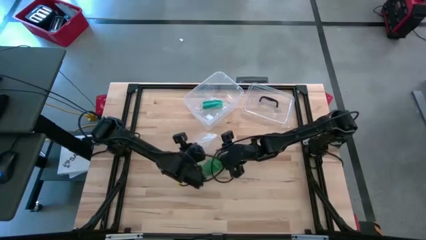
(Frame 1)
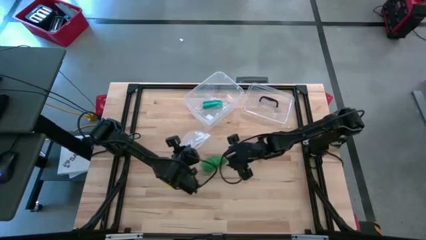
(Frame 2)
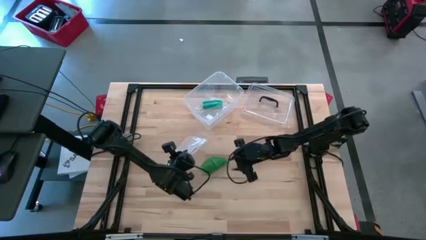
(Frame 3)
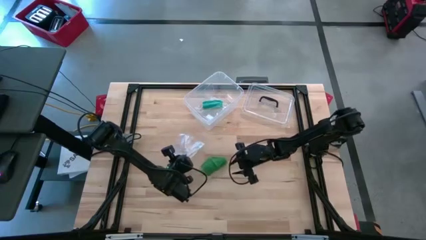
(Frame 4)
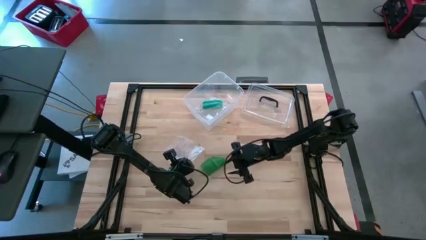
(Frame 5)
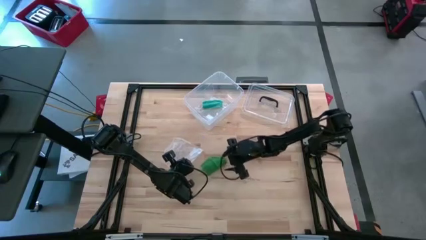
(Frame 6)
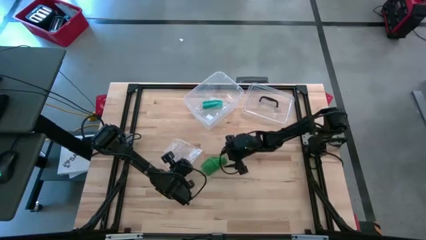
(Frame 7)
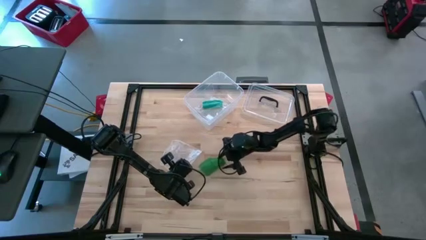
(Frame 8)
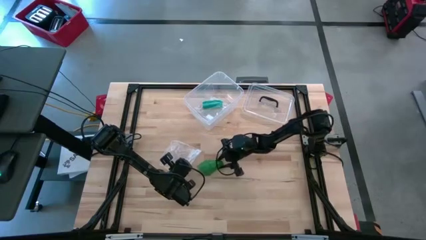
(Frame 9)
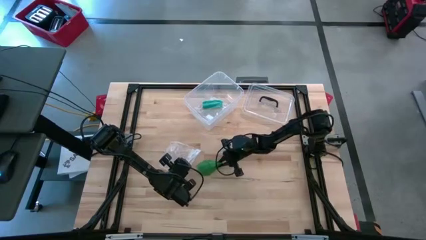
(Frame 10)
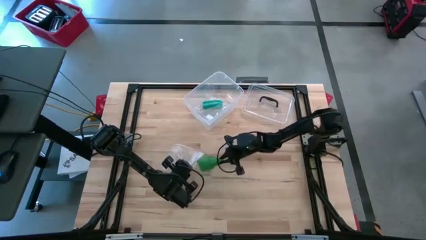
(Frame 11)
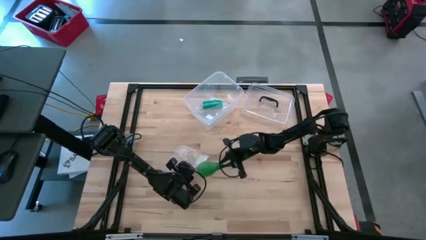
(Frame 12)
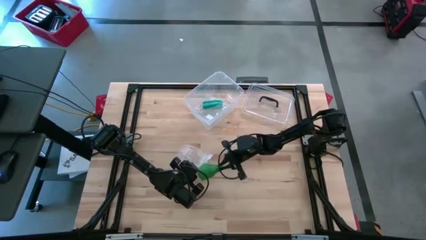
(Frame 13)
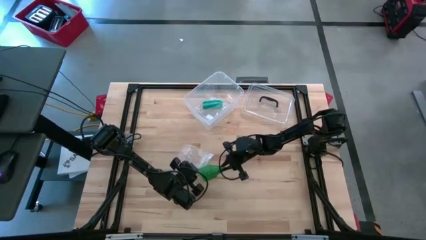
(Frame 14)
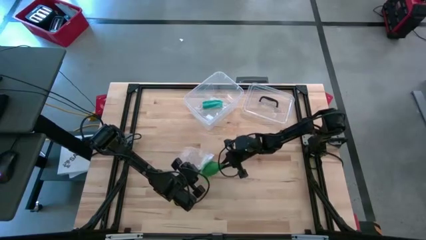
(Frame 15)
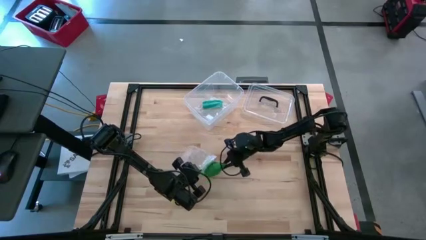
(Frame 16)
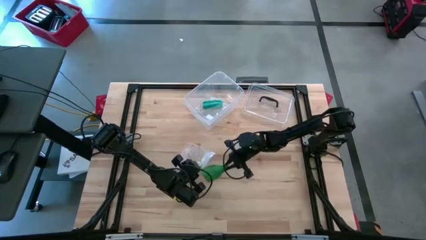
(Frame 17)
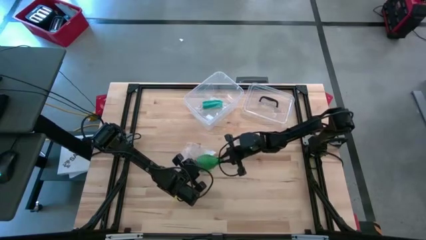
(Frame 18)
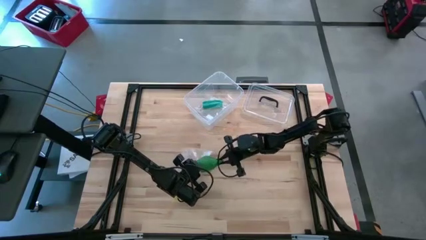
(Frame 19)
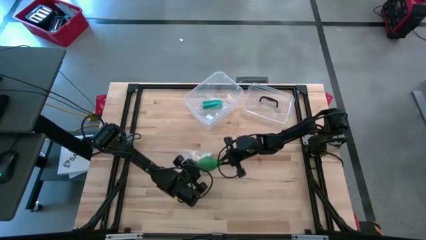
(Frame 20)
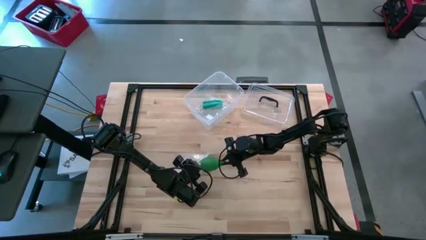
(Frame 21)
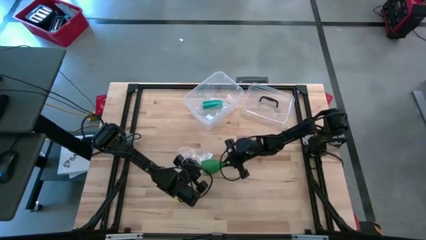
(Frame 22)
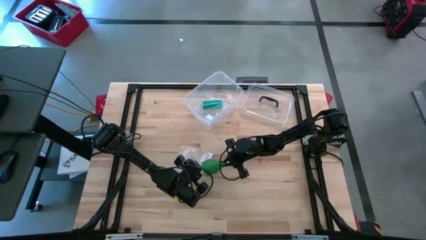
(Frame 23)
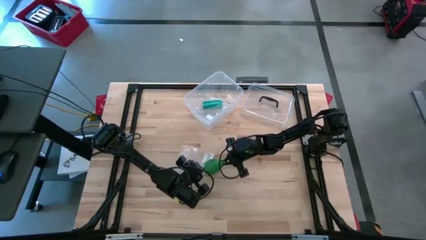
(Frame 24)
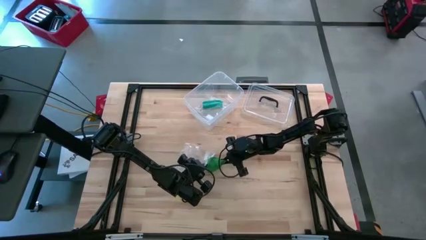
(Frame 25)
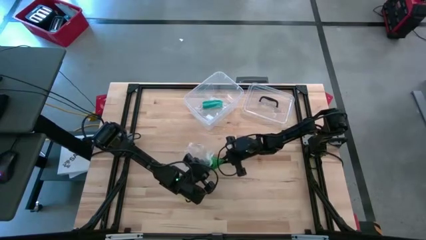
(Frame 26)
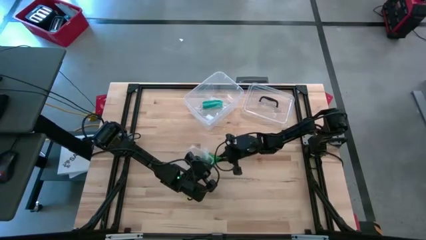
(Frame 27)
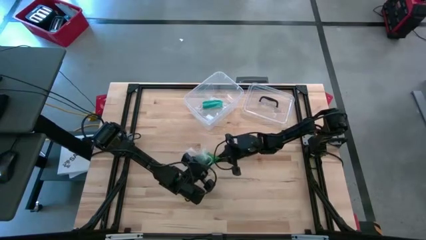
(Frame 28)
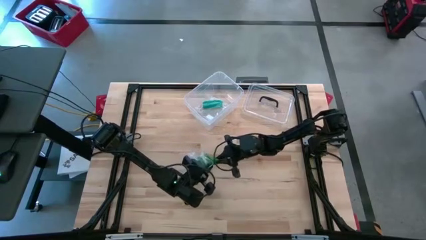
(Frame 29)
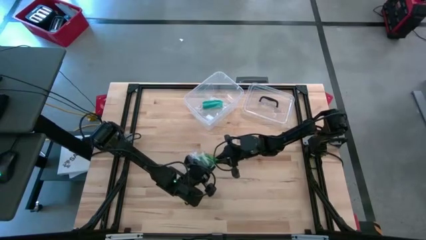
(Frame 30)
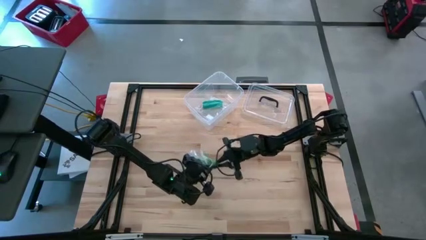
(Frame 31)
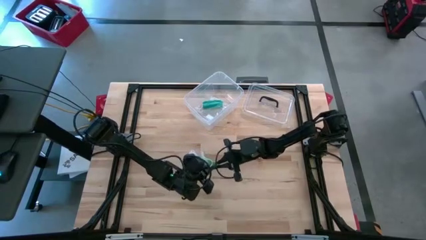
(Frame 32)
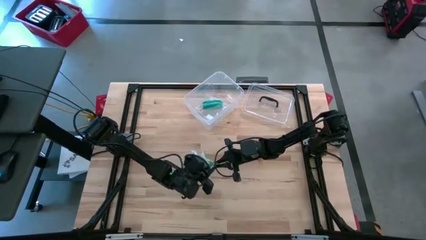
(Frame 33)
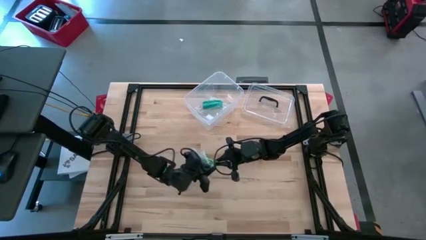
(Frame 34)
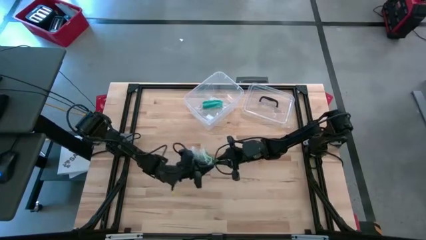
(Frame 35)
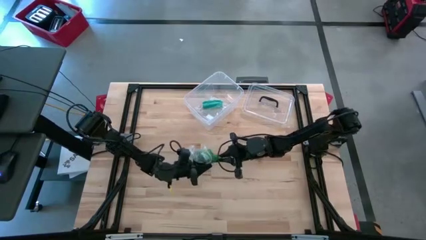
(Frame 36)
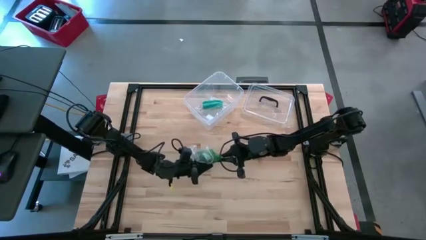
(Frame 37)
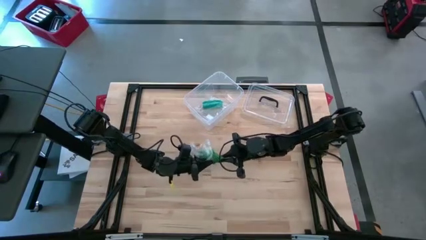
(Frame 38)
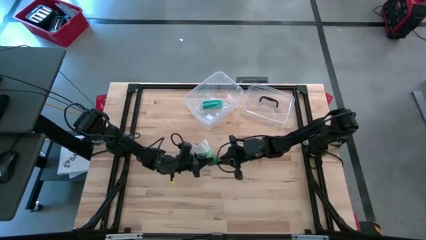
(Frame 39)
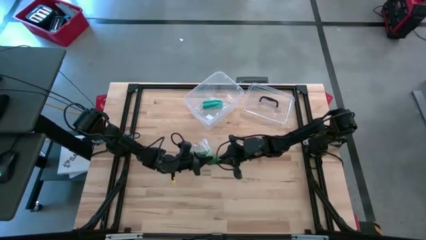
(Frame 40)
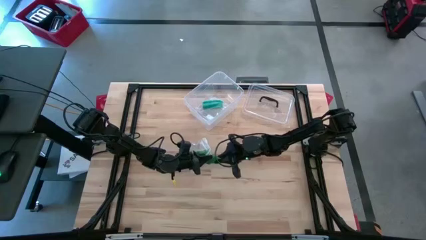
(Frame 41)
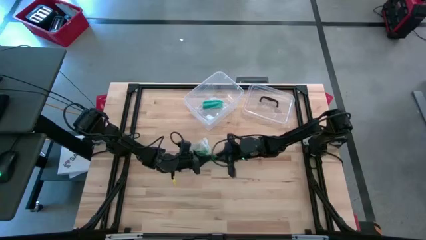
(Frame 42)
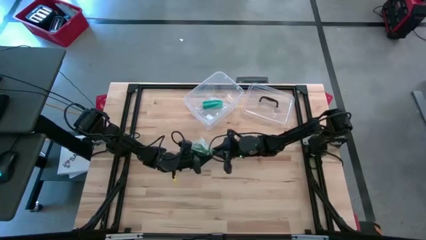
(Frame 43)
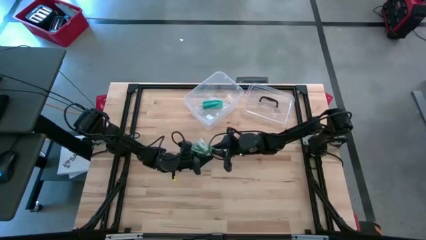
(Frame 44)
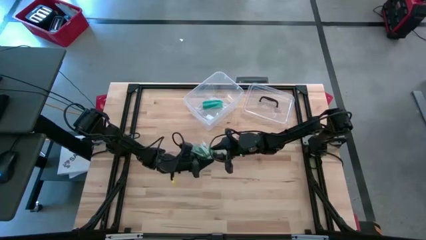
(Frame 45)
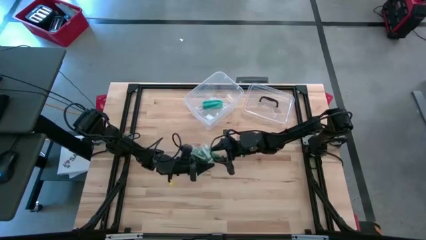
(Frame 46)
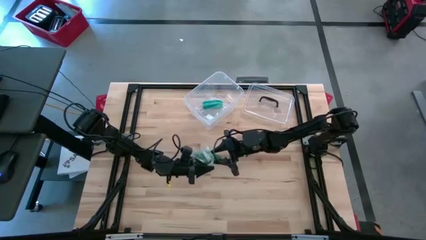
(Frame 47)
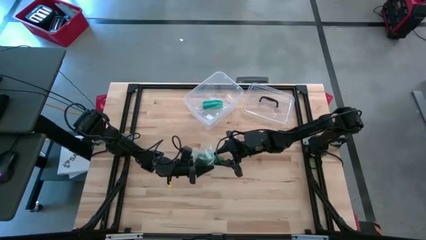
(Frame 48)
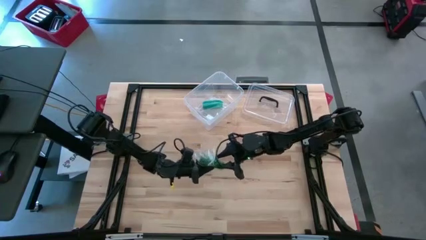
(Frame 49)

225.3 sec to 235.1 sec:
Task: Roll bandage
Put the green bandage into the transparent zip bag

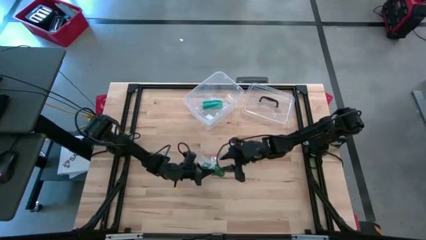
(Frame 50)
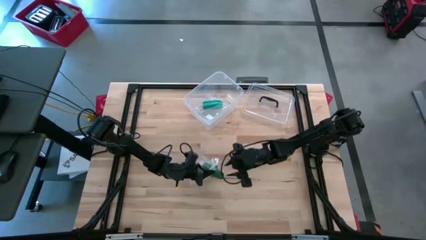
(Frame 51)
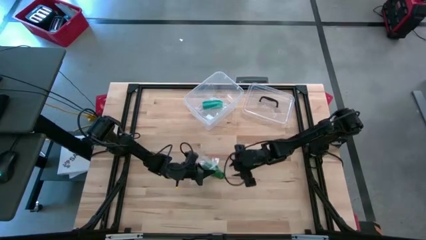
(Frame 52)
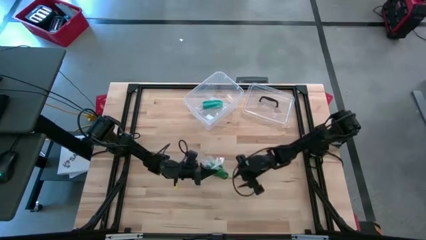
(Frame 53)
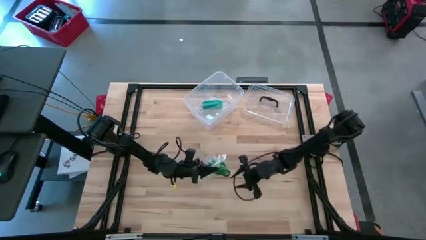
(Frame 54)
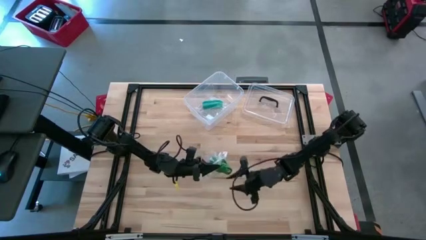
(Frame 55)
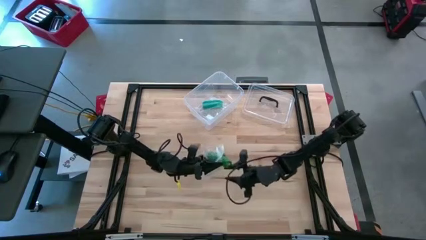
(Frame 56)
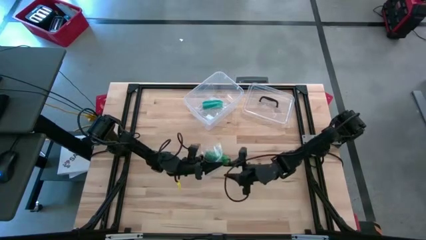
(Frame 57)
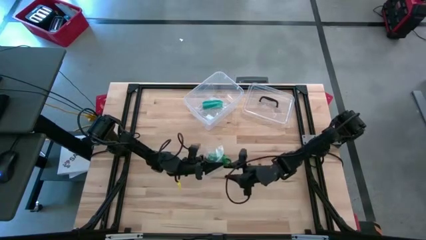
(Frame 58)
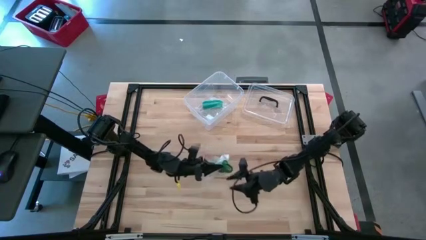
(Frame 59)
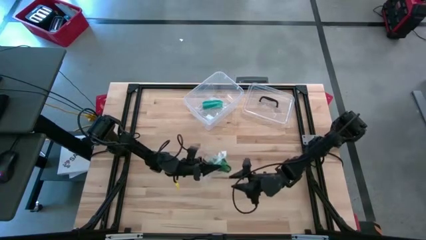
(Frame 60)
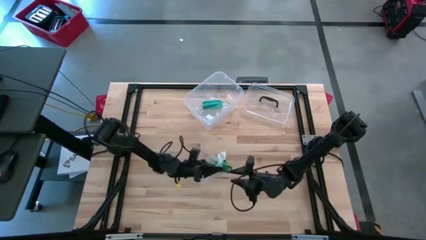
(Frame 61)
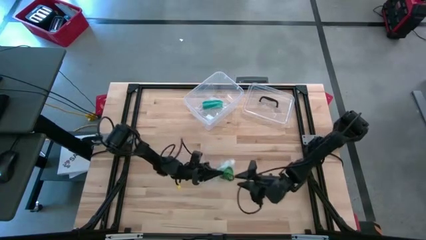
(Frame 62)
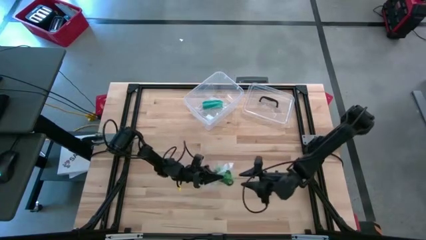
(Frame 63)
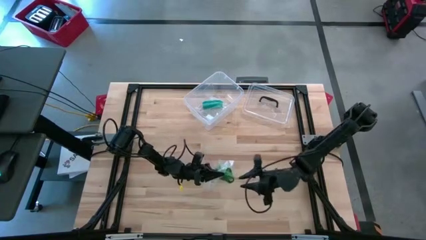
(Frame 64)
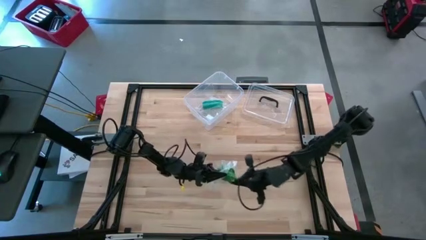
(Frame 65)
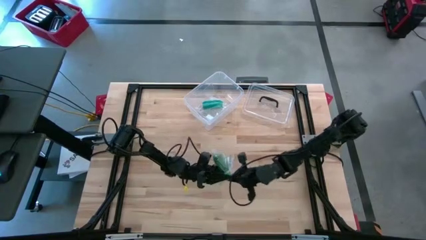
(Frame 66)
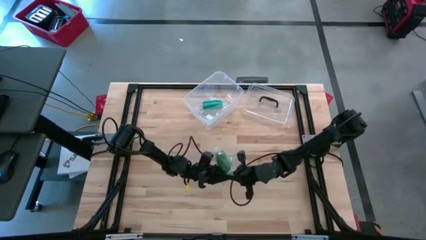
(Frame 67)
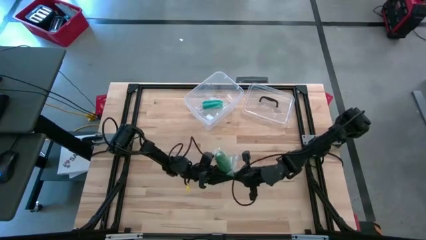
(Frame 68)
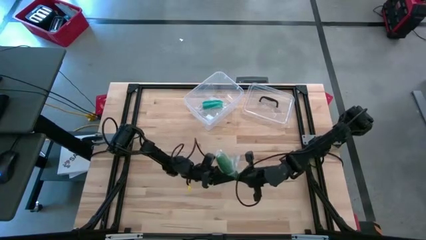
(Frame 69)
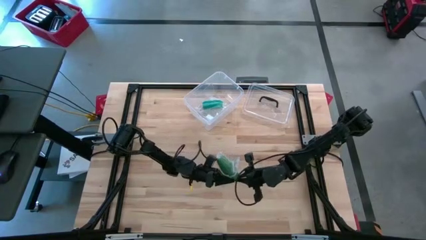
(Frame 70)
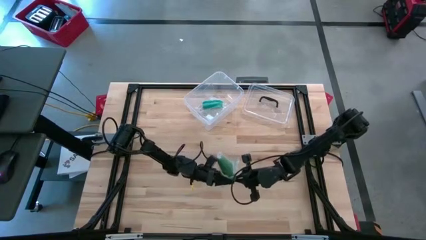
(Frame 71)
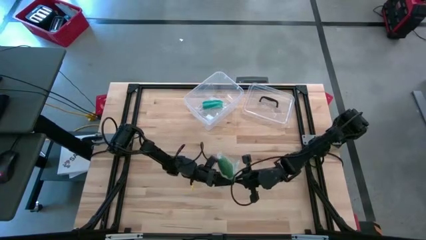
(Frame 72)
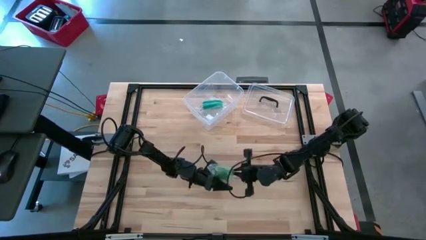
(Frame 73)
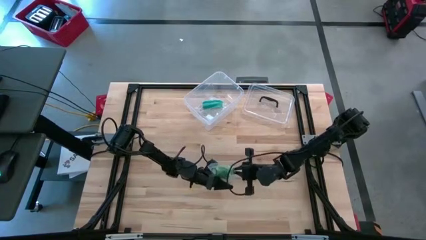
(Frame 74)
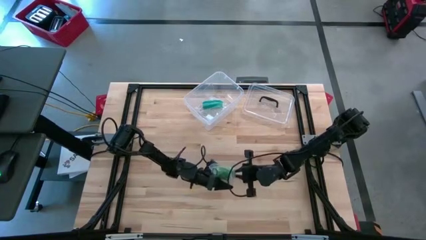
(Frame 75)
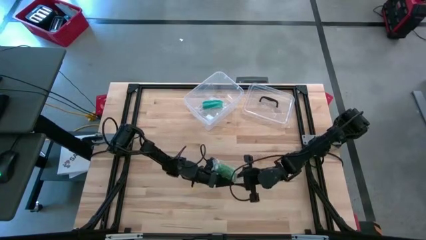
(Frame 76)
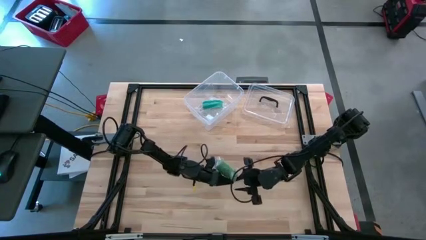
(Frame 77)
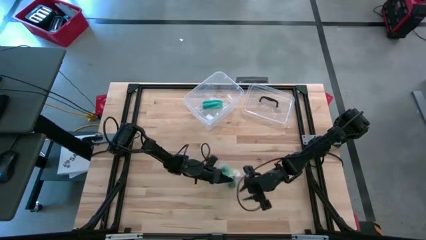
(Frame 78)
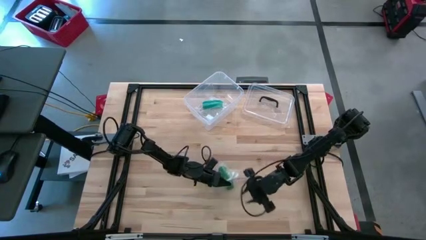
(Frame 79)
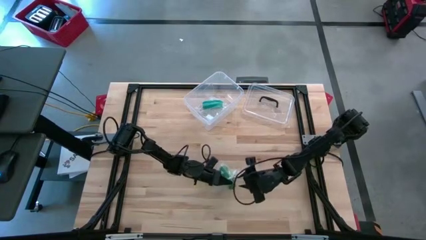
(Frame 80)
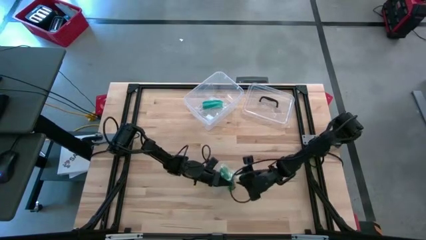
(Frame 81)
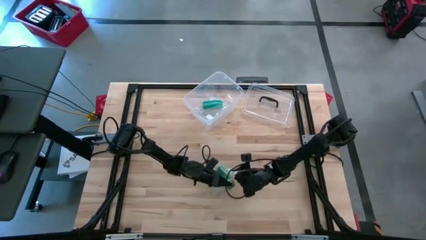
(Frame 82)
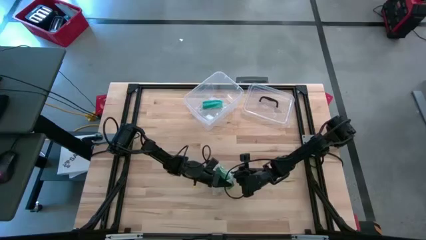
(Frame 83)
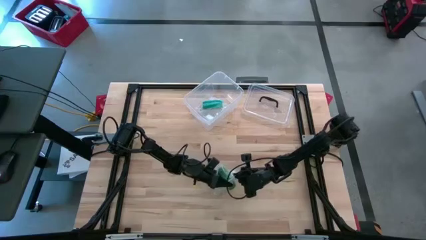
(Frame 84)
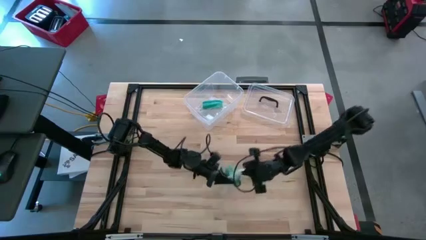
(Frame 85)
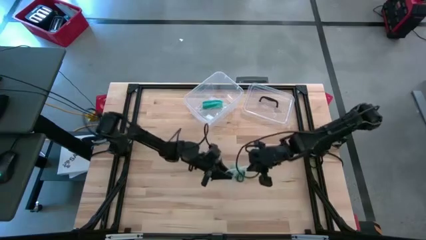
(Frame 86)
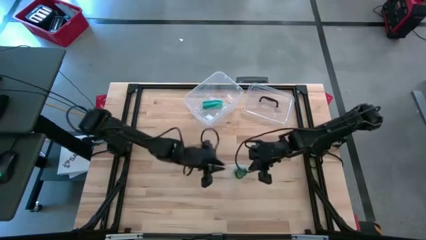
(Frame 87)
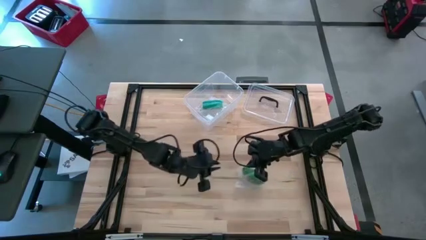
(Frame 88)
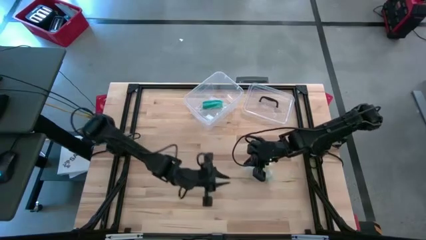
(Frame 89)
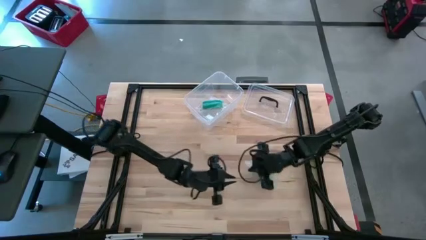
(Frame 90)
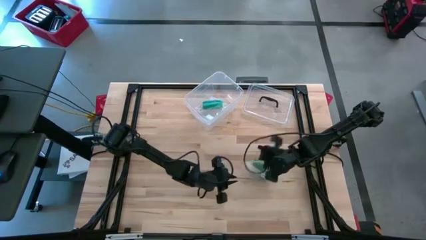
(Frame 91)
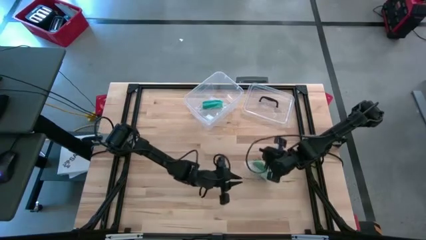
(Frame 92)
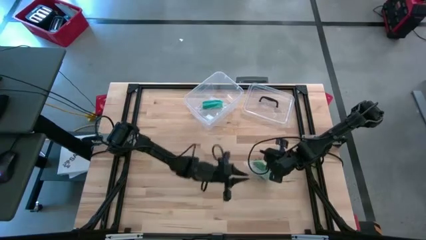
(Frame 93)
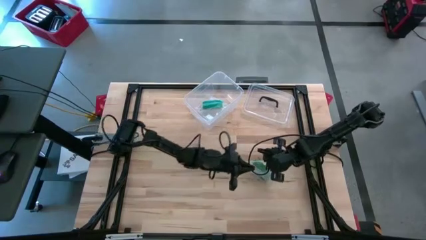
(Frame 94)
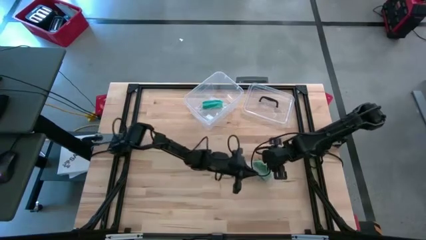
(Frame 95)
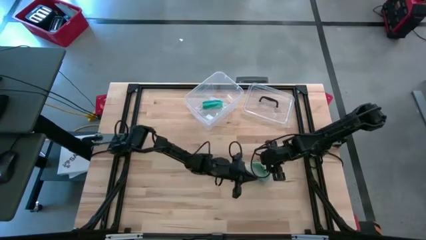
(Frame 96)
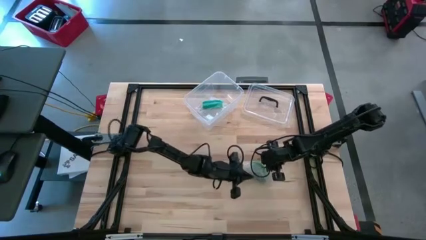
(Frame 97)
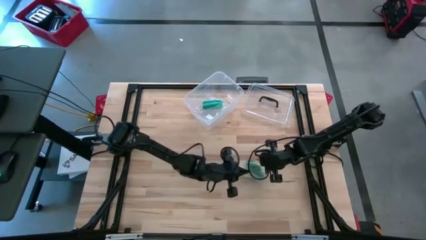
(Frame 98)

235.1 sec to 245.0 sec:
Put the green bandage into the transparent zip bag
